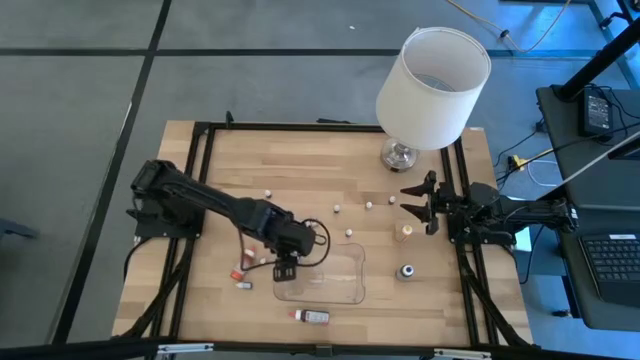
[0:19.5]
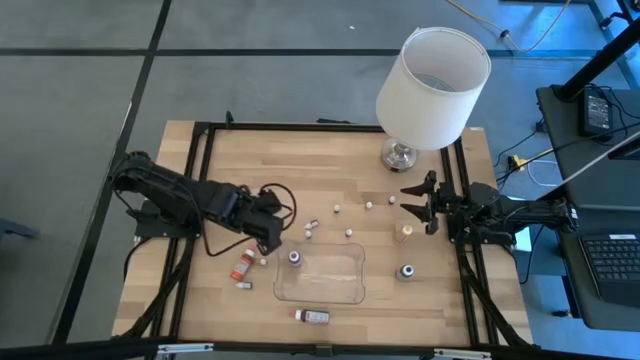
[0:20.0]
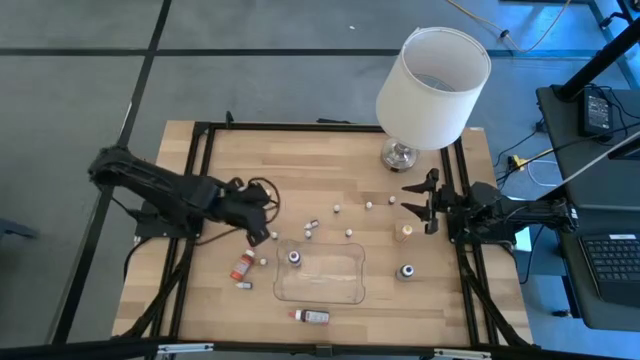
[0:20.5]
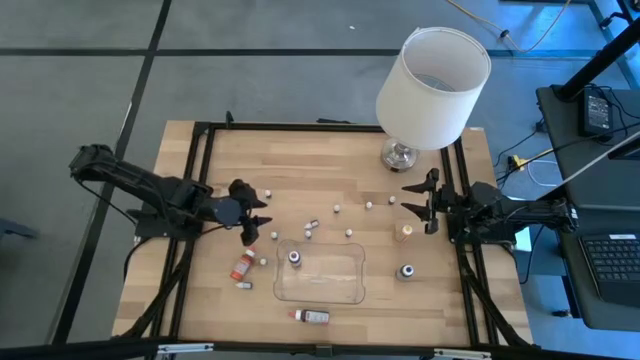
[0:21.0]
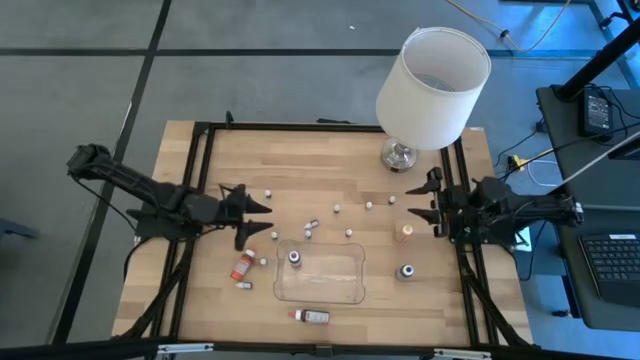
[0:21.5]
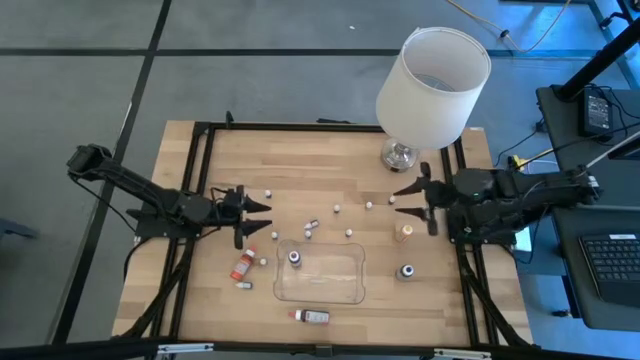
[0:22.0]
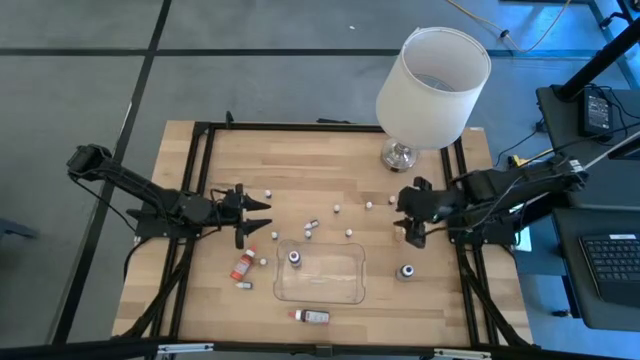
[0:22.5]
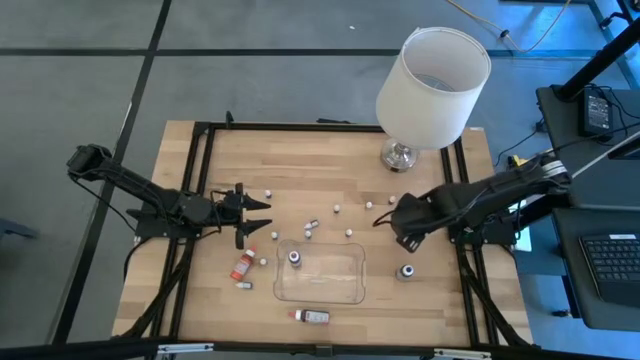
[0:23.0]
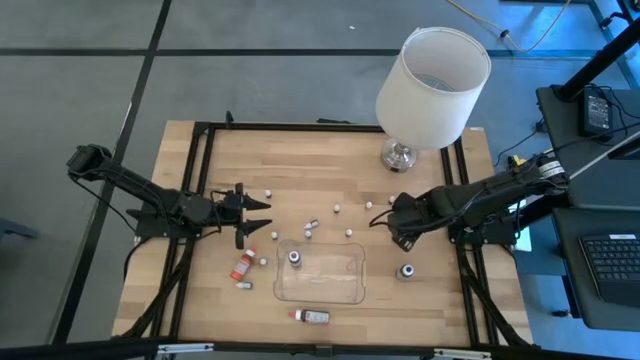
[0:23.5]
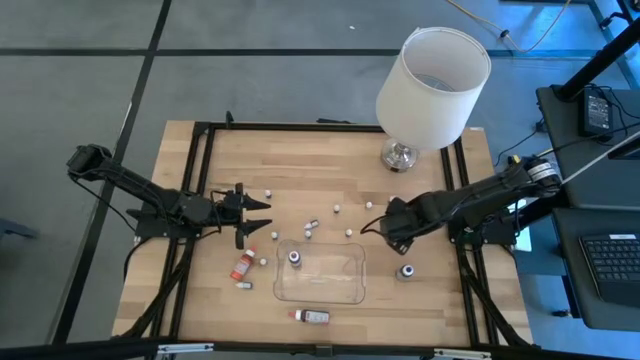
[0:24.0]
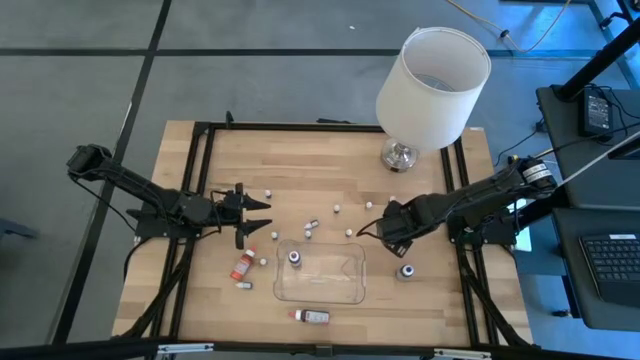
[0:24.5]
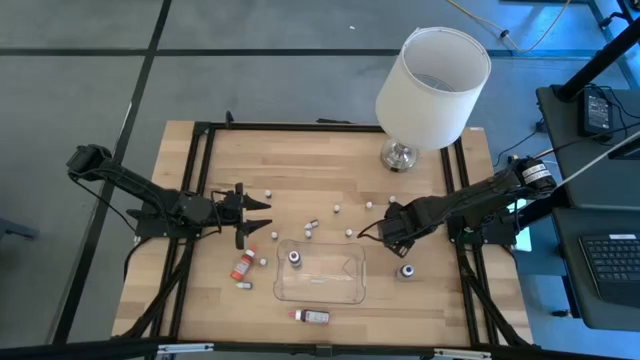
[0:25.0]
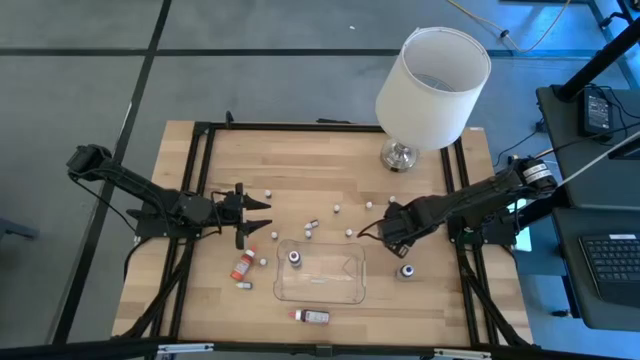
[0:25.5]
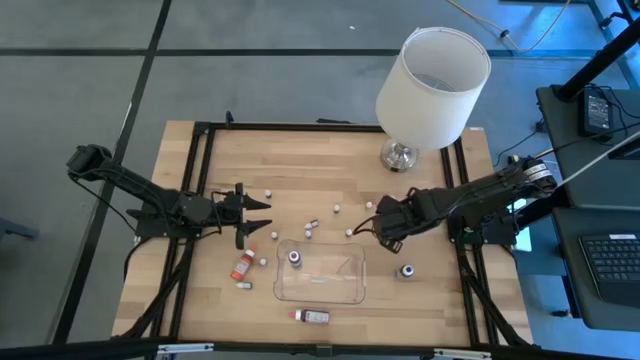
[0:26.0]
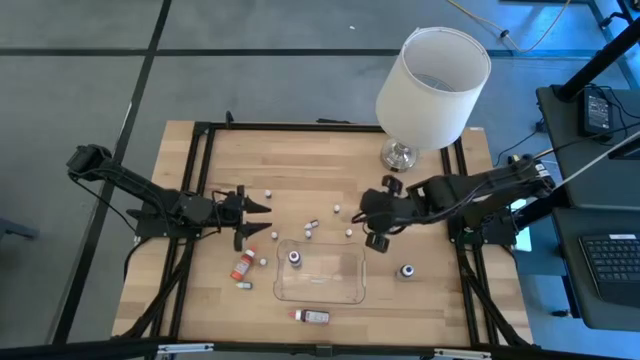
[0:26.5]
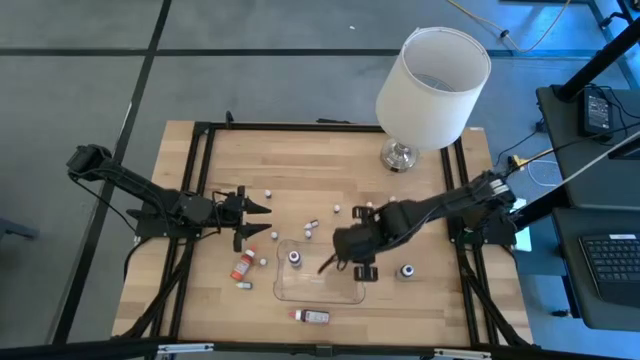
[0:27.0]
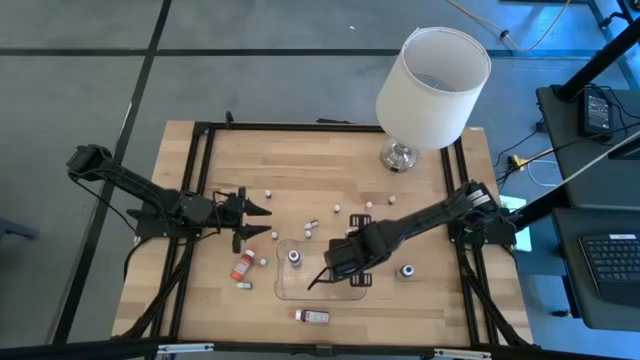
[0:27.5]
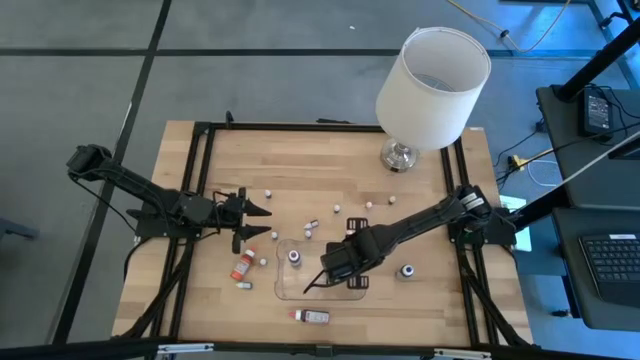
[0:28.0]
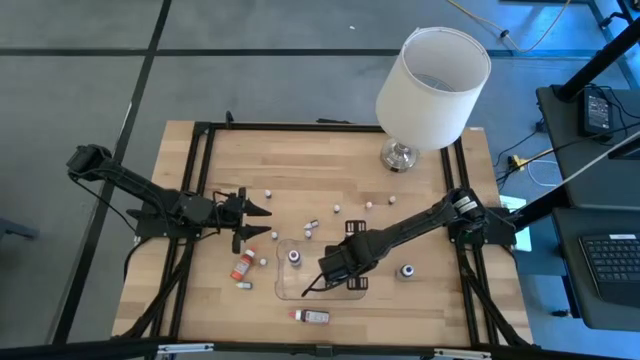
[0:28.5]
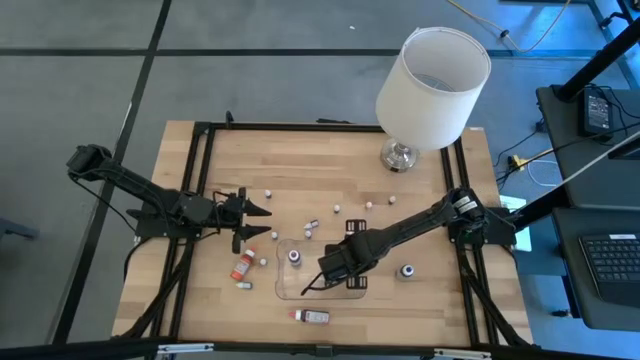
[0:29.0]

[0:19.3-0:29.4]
Task: Pick & Place food coloring
Put the big yellow food coloring bottle into the container

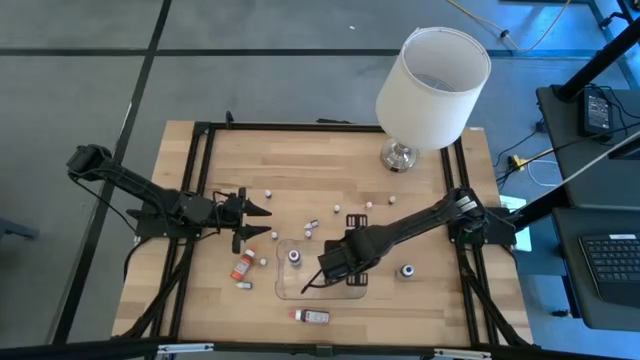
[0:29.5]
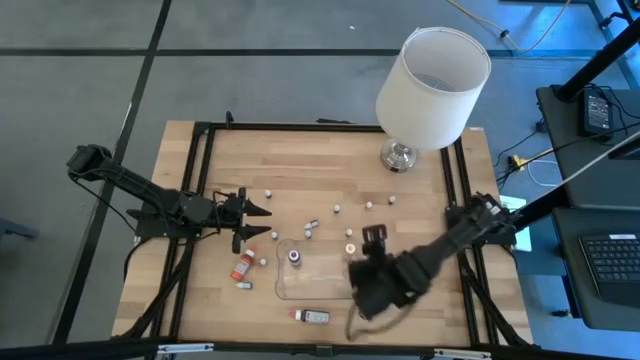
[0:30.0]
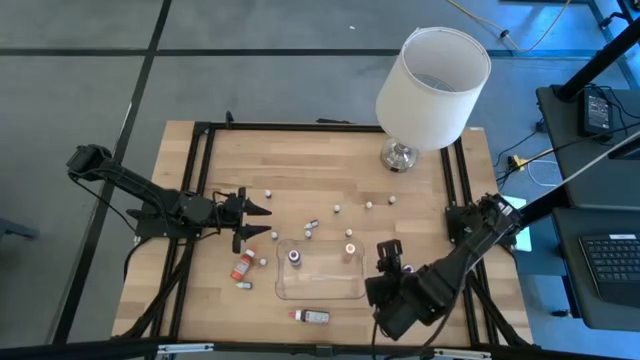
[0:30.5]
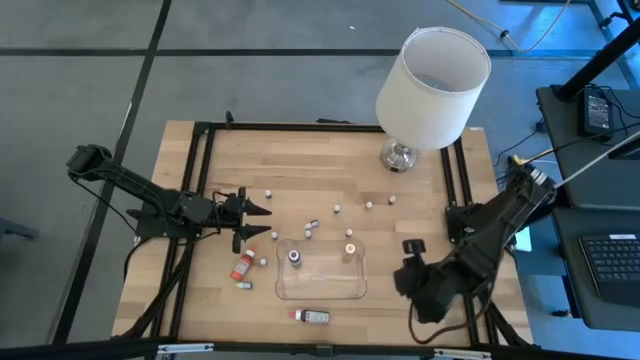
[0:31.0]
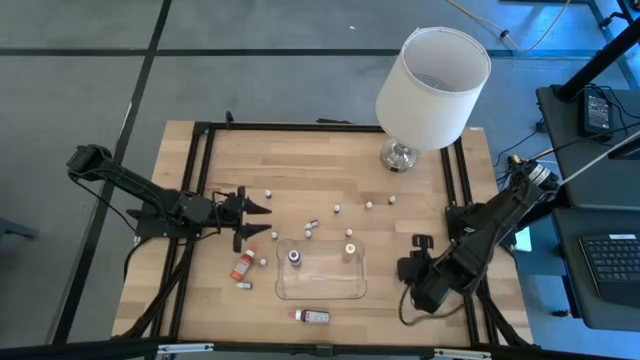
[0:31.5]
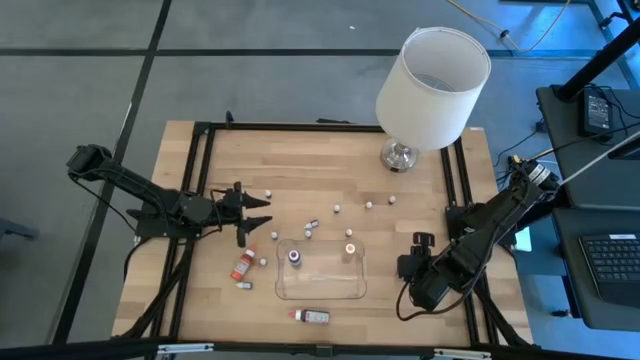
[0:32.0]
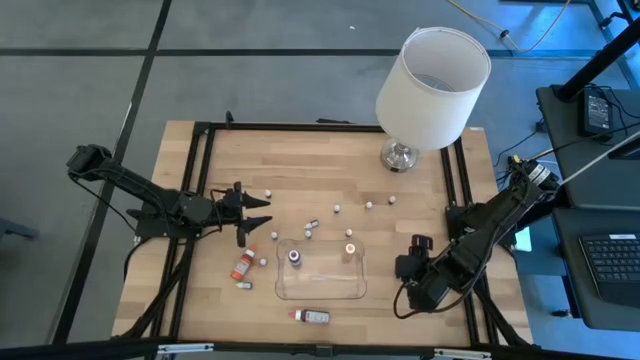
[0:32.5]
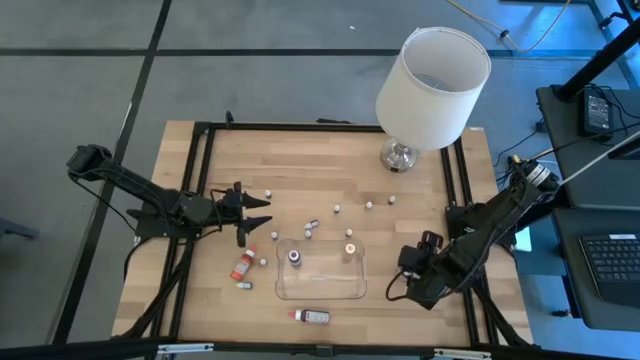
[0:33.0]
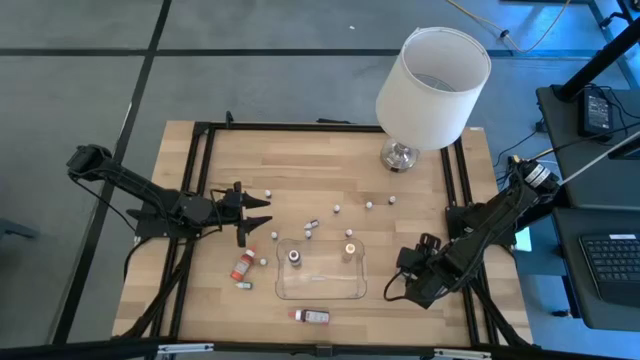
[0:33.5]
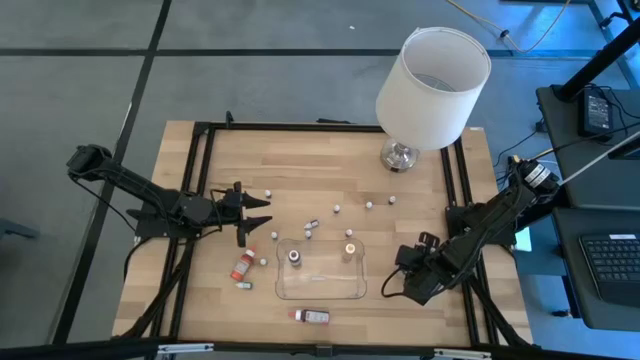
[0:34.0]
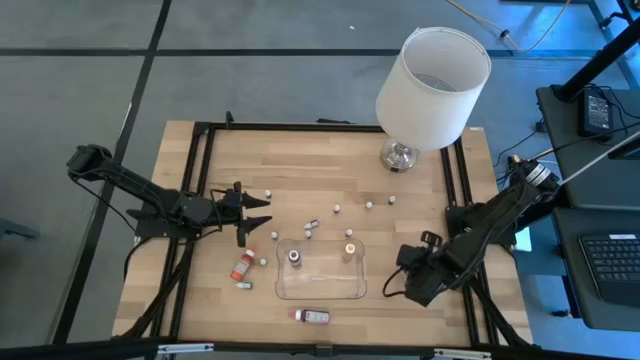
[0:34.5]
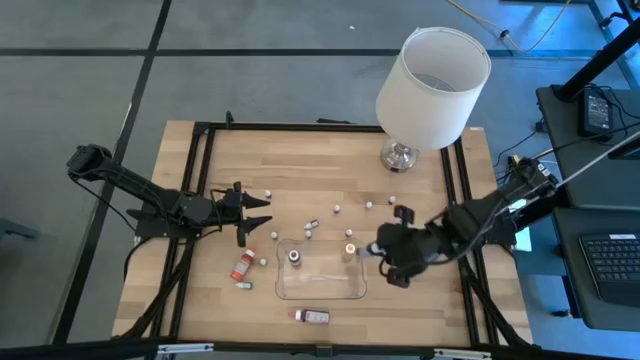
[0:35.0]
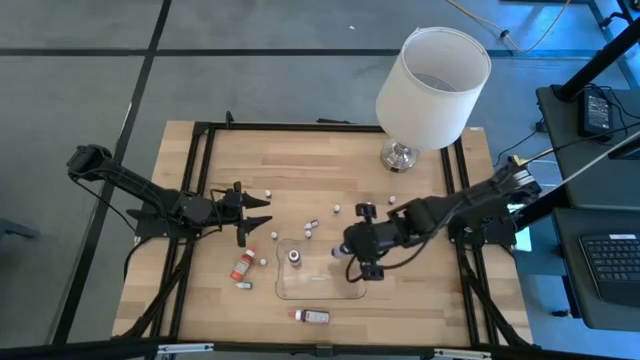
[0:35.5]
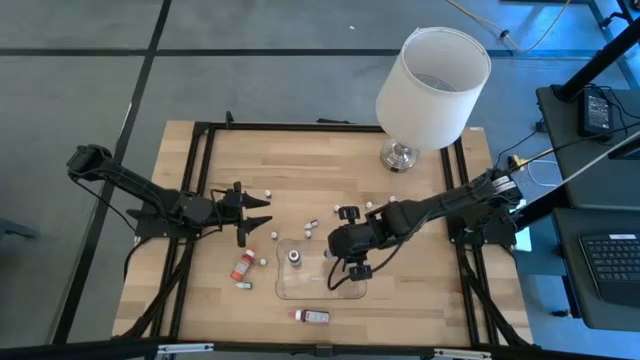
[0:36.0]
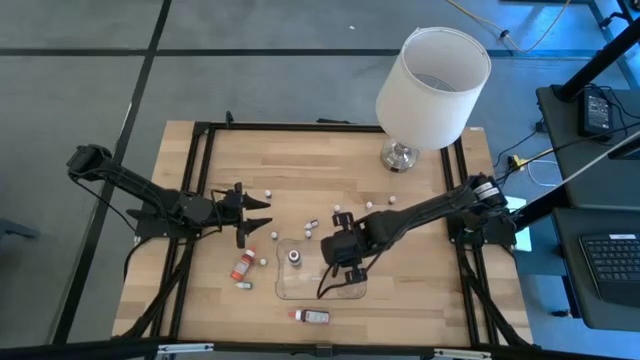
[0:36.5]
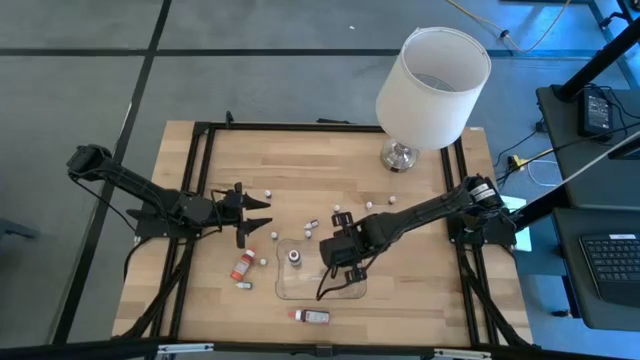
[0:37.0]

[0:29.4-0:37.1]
Put the big blue food coloring bottle into the container

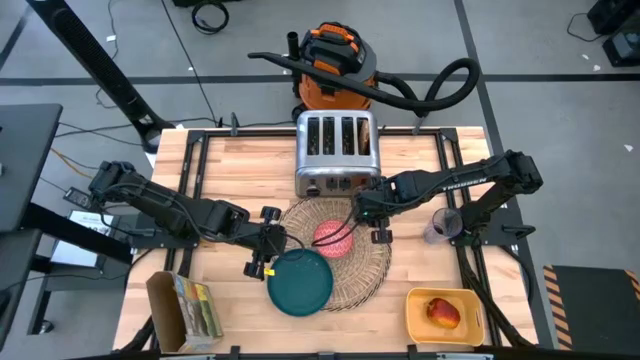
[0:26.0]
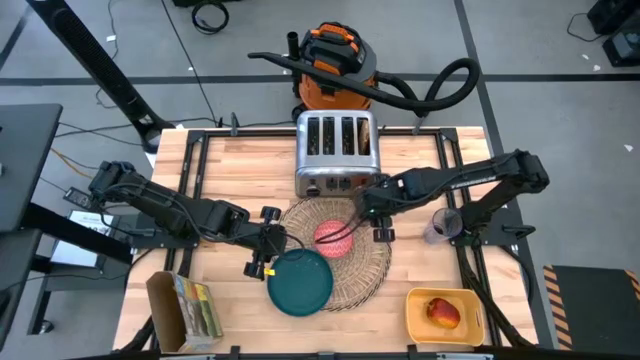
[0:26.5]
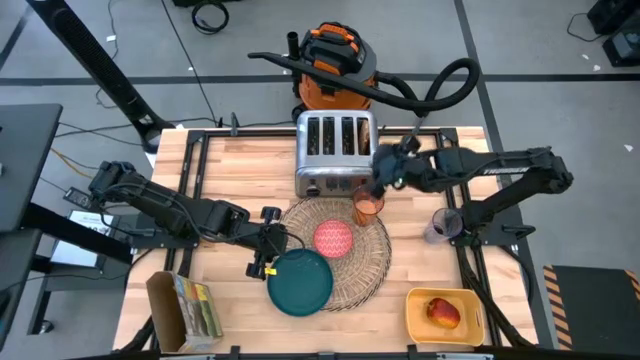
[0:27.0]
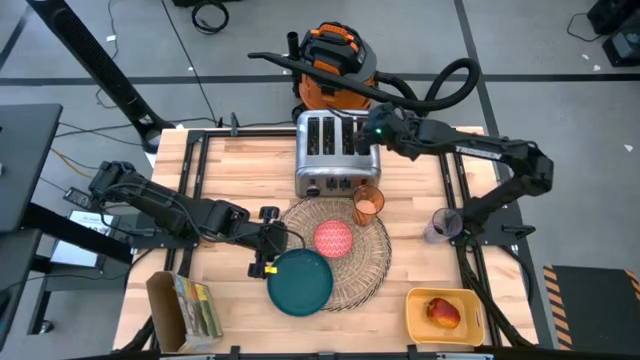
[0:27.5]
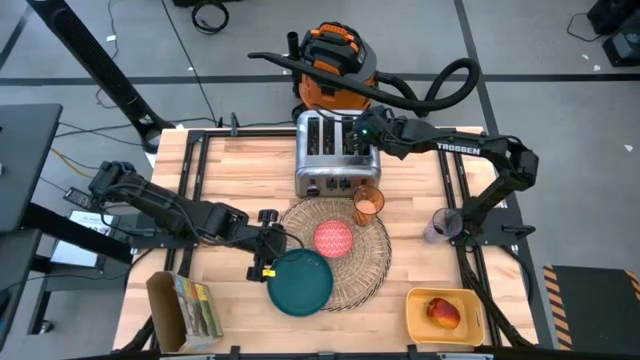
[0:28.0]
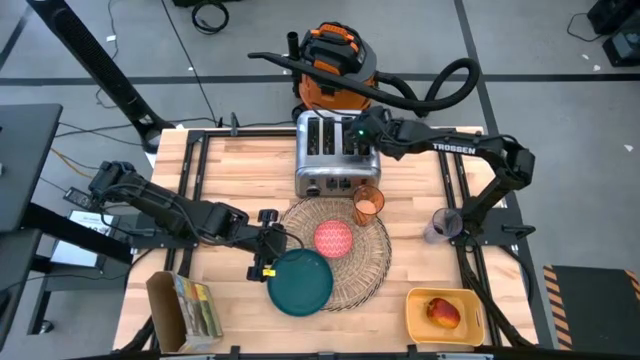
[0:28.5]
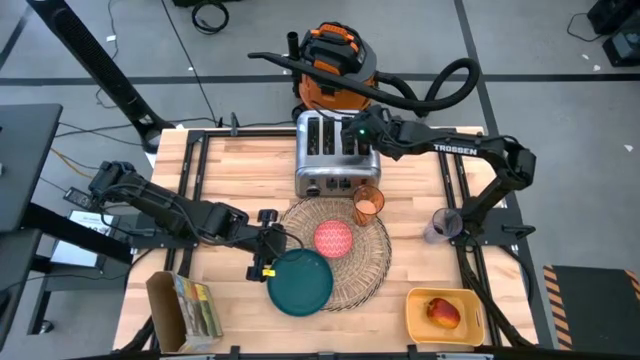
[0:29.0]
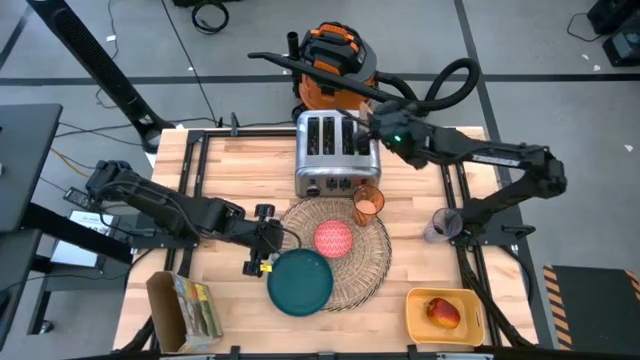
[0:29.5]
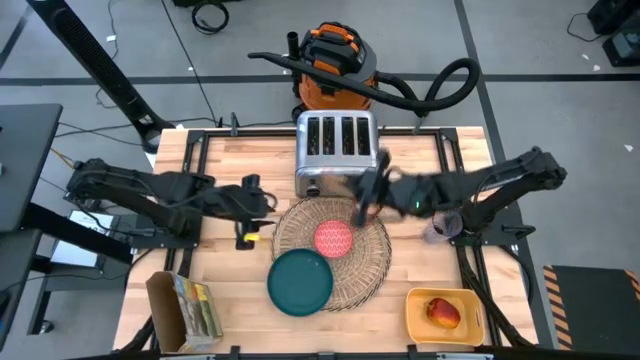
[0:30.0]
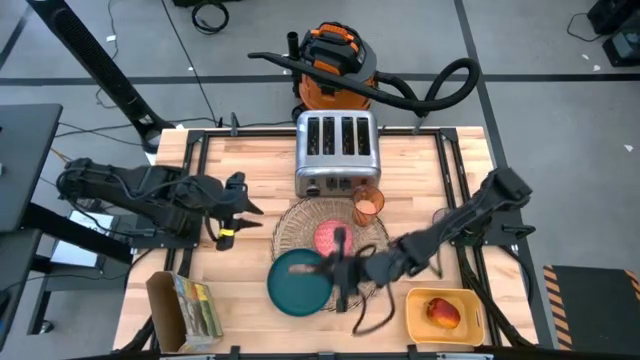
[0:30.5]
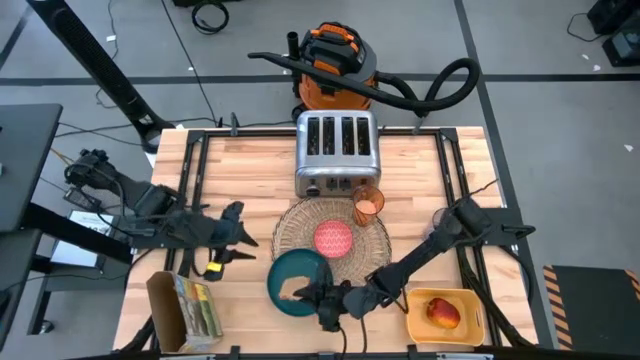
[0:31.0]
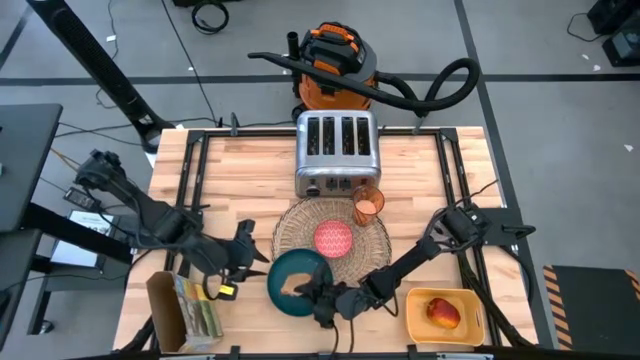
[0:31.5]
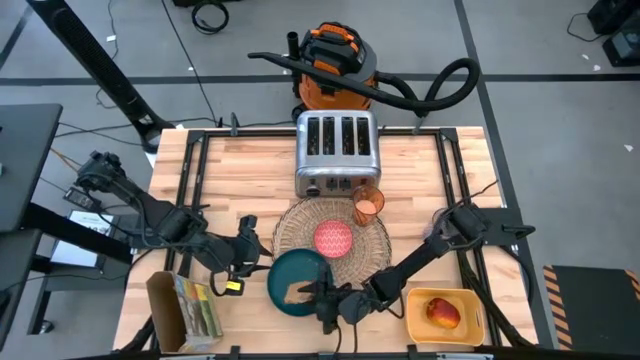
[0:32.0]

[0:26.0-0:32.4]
Task: Arrange a breakfast setting
Put the brown bread on the blue plate to the bottom left of the red patterned bowl
